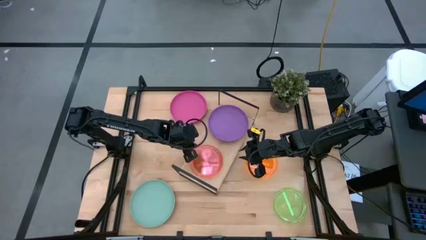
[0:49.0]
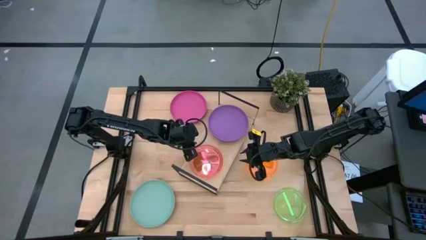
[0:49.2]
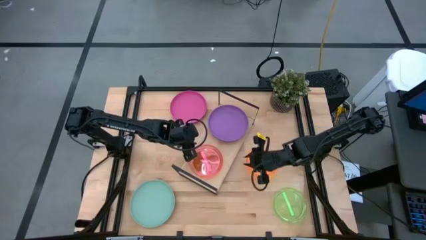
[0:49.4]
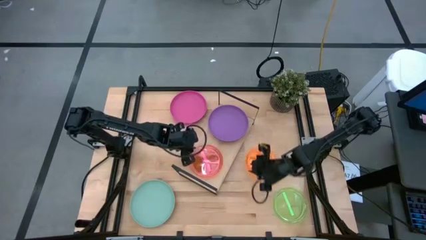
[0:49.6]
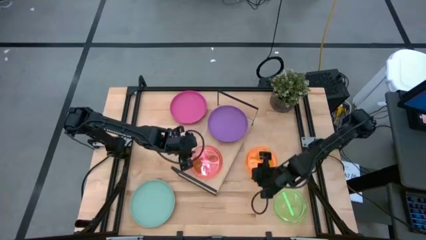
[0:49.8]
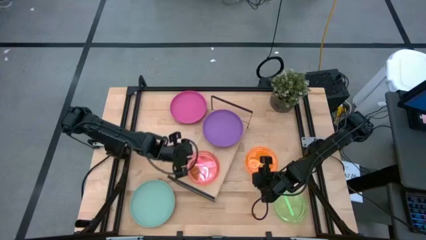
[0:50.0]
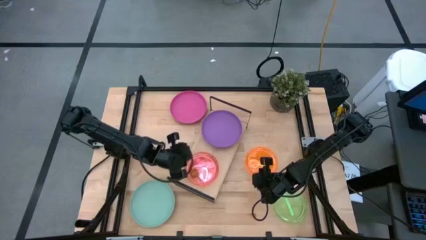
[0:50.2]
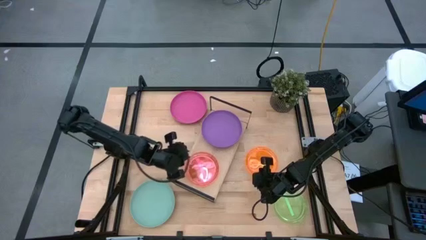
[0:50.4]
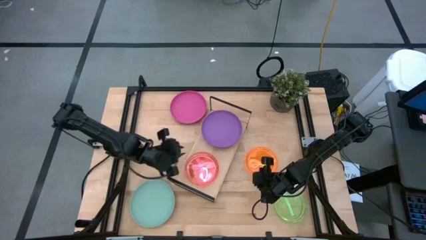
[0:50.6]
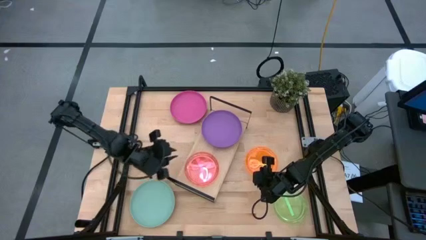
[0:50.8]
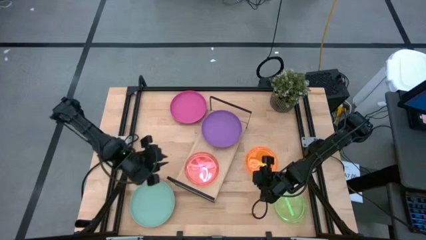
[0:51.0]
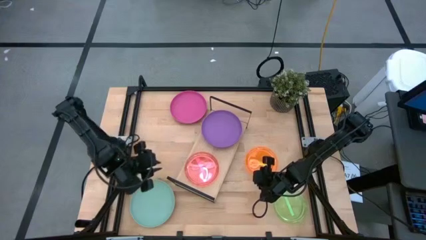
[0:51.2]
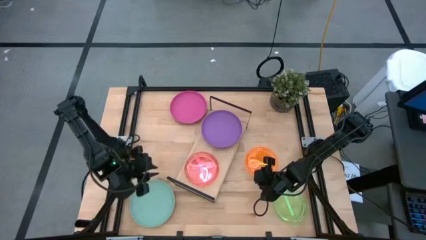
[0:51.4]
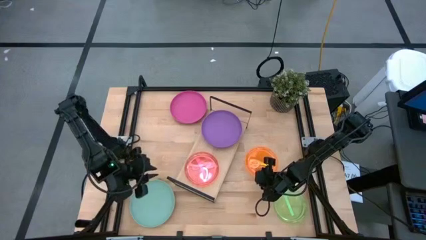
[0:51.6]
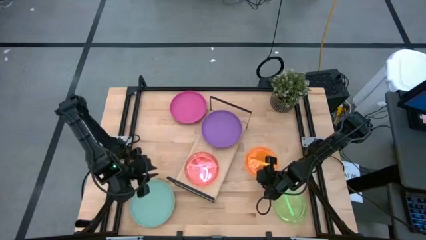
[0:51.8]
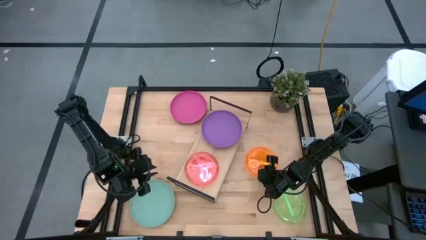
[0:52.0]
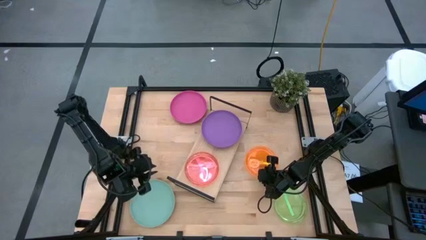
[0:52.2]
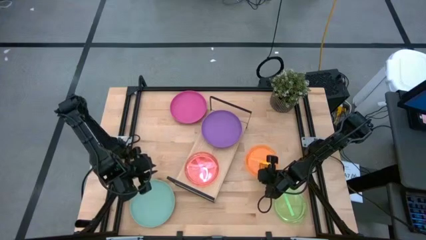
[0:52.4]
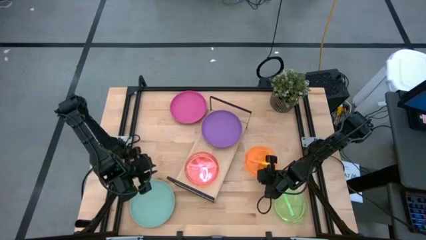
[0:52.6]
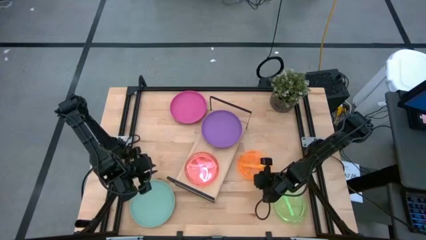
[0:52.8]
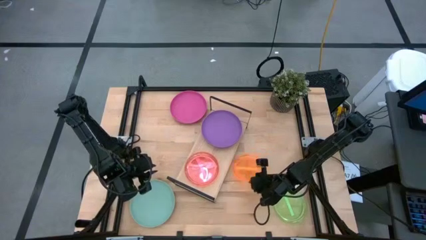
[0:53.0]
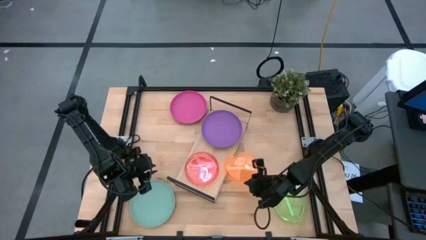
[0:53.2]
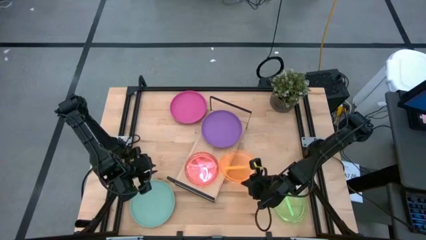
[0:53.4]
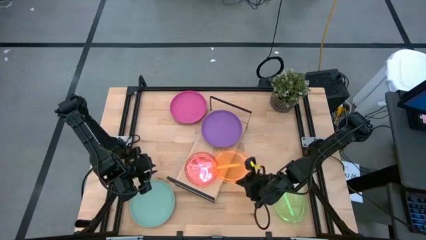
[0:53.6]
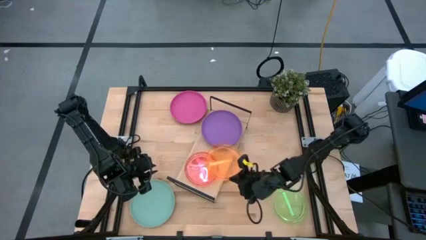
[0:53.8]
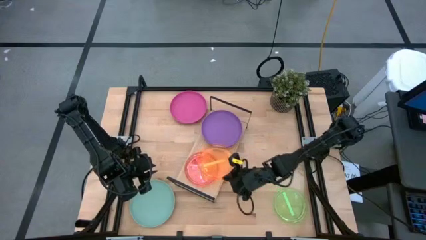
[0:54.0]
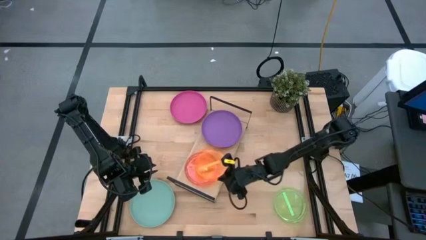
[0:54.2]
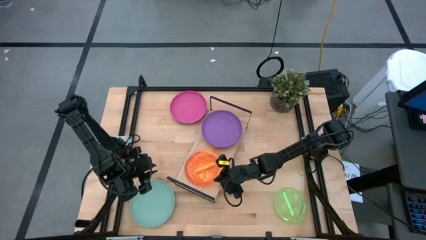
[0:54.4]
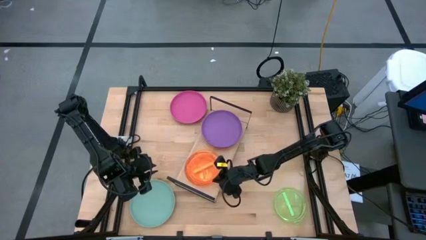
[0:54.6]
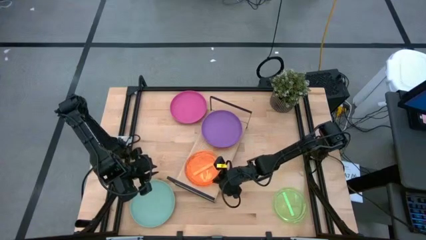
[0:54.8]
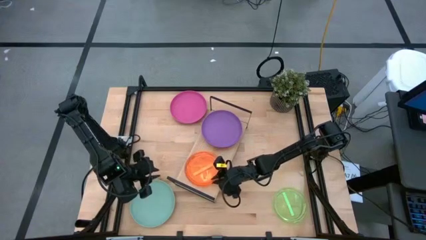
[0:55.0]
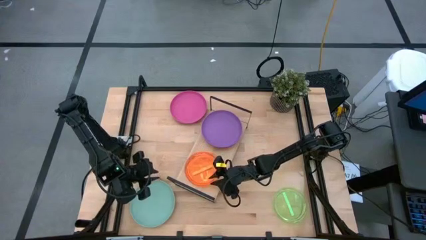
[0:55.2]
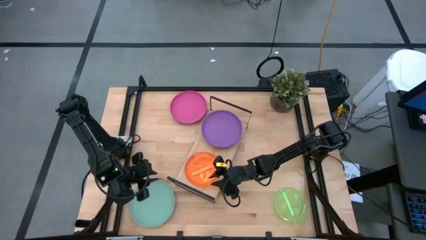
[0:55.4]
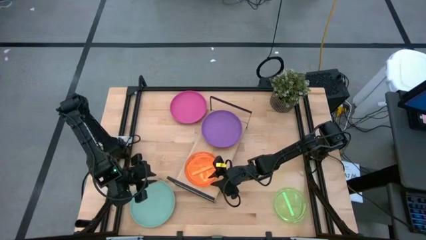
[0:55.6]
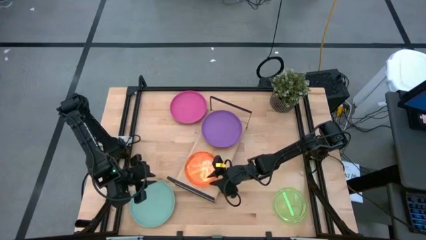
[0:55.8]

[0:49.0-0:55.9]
Task: Place and stack plates onto a shelf
Stack the orange plate on top of the red plate on the shelf

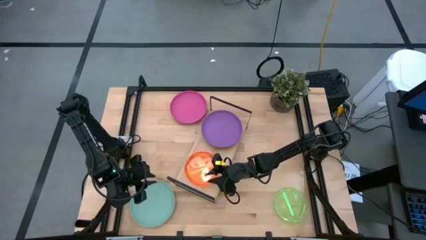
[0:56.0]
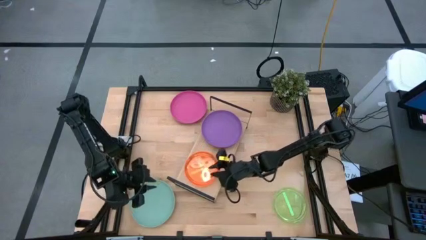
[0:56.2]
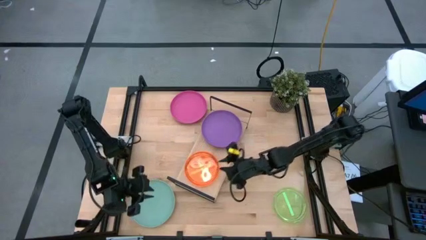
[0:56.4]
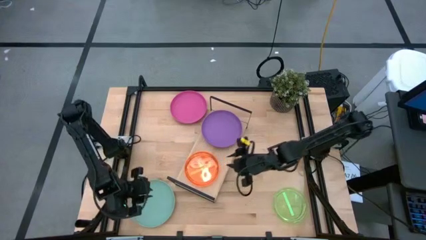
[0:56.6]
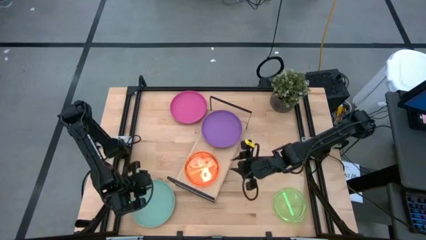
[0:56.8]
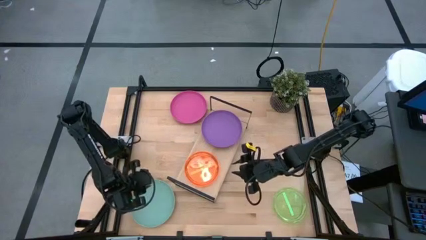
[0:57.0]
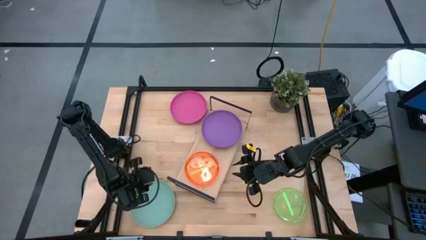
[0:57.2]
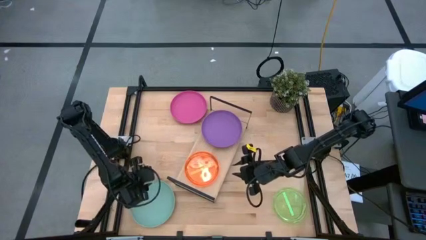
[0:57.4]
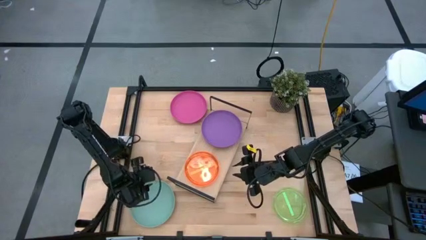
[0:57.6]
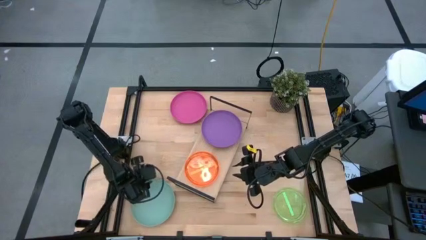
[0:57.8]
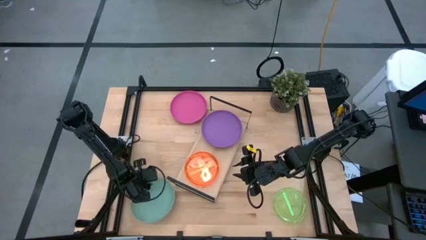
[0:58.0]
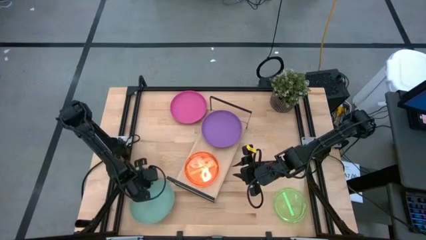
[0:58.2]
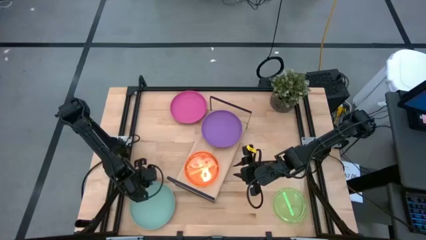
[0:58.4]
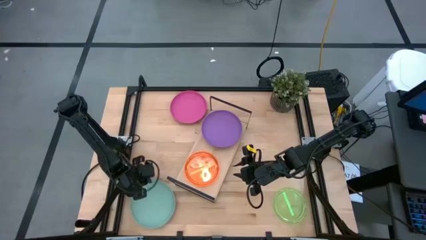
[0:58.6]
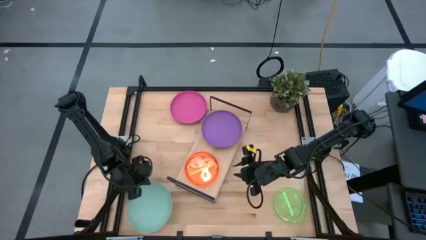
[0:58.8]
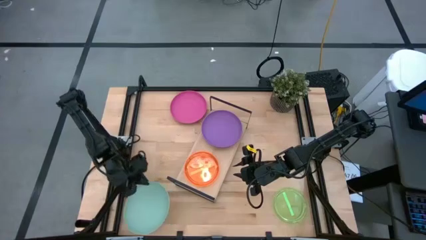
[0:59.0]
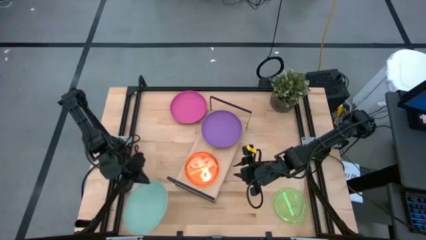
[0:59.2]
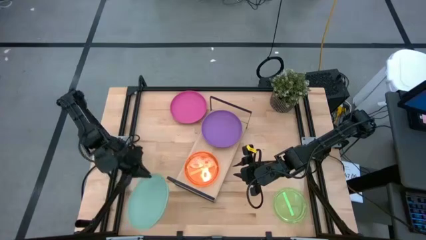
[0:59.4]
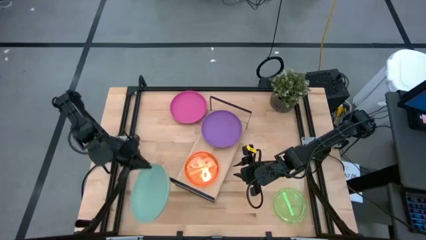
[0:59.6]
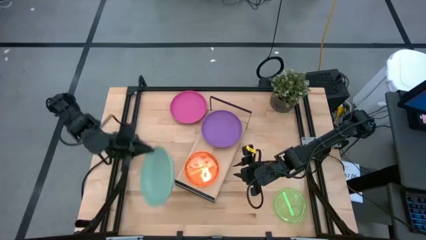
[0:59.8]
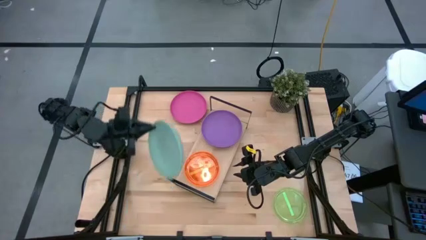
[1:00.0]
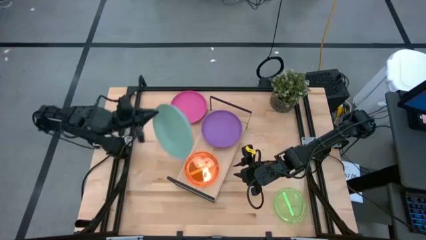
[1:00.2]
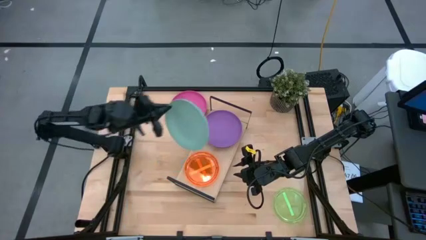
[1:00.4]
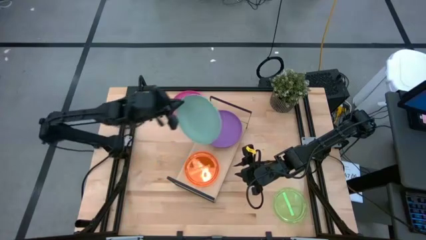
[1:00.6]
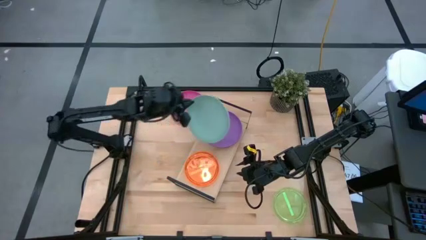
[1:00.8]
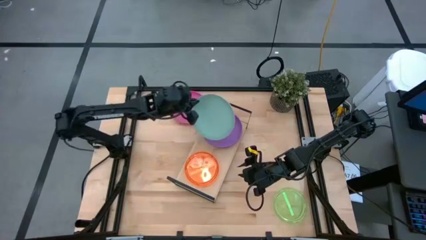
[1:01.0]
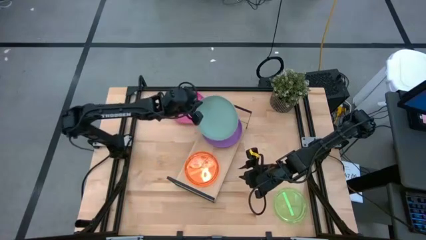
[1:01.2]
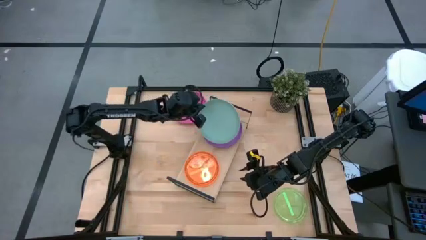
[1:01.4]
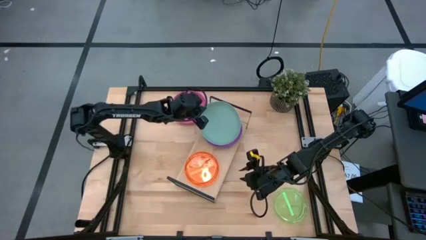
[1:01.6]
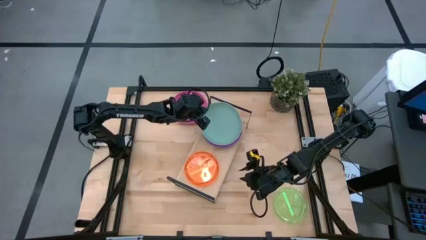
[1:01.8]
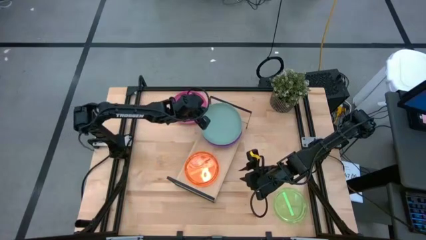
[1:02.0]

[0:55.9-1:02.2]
Stack the light green plate on top of the violet plate on the shelf

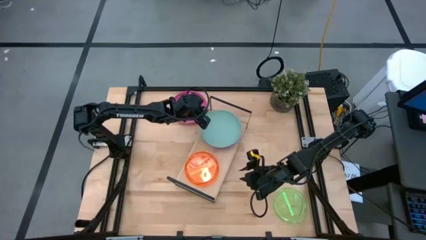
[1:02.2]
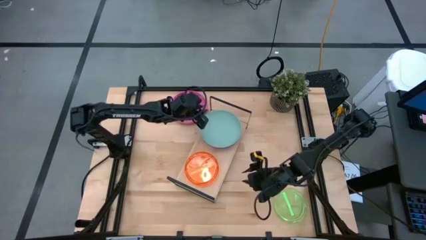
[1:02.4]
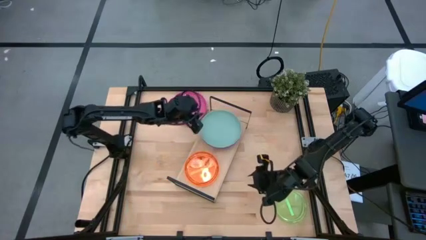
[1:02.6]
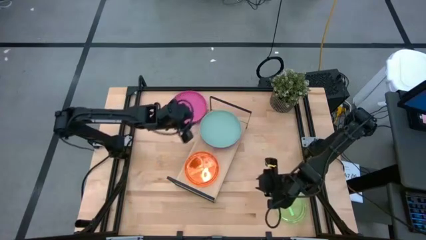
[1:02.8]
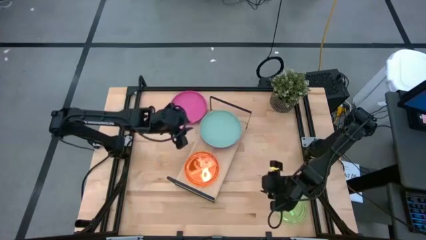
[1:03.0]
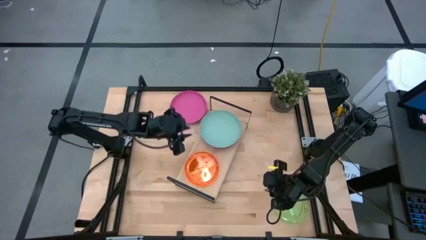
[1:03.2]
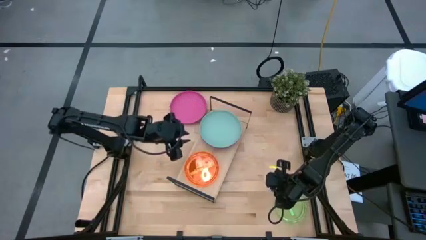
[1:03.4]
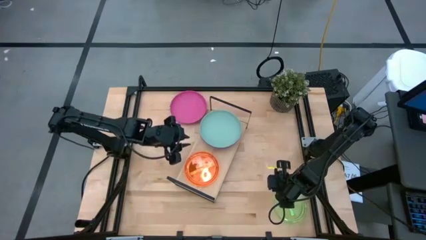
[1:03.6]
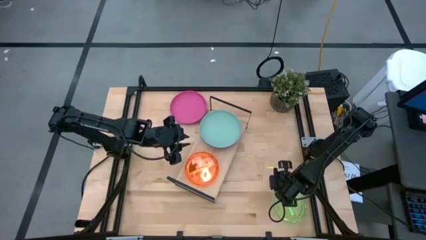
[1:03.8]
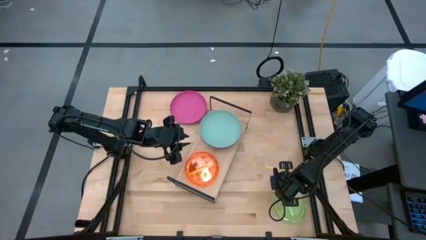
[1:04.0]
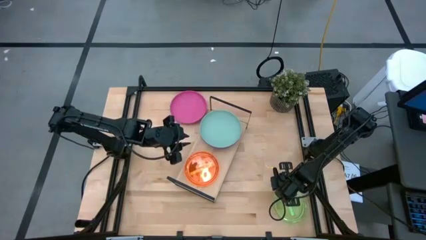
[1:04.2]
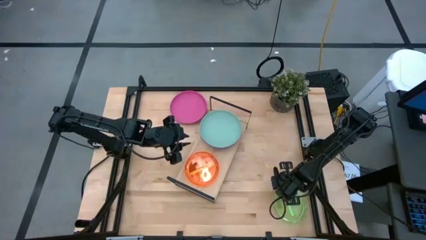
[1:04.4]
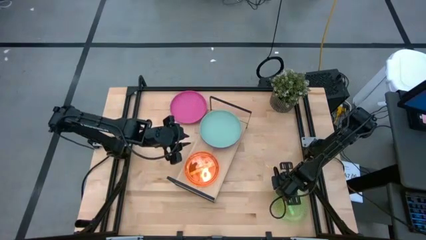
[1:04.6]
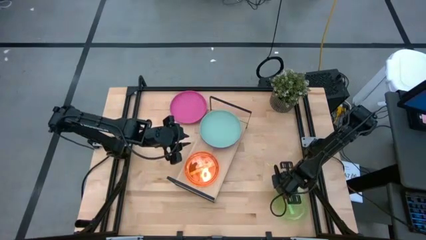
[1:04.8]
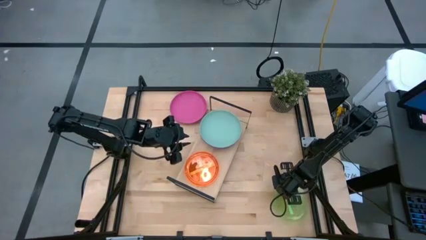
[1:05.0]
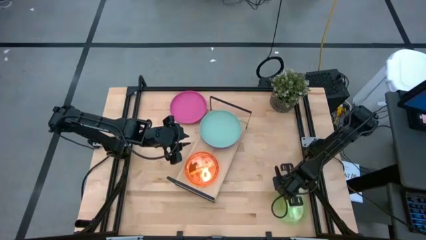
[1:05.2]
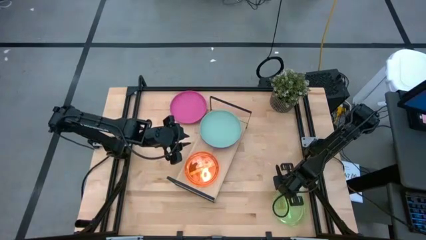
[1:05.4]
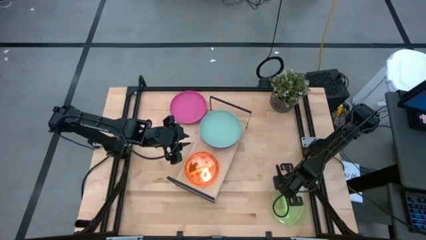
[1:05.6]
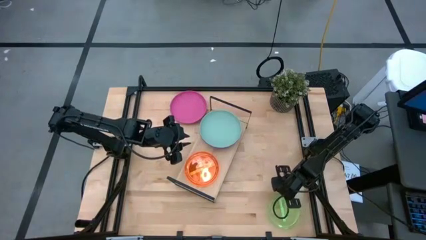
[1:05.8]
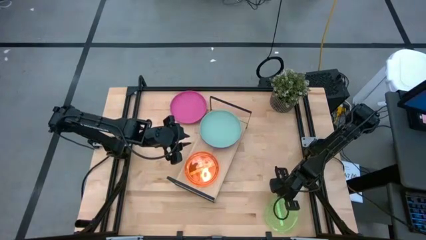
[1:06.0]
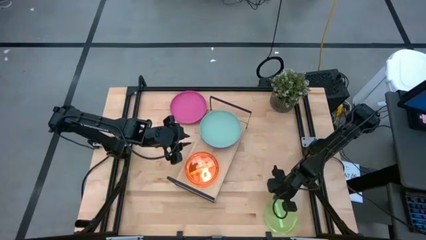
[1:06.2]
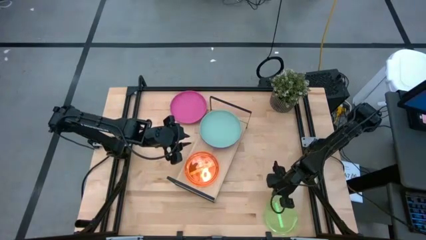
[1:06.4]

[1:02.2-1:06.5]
Stack the green plate on top of the orange plate on the shelf
